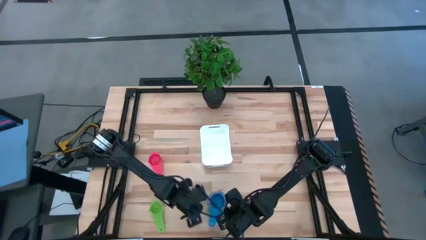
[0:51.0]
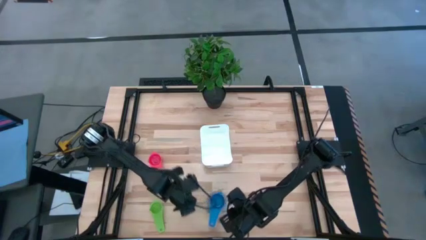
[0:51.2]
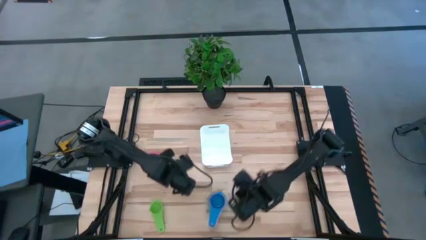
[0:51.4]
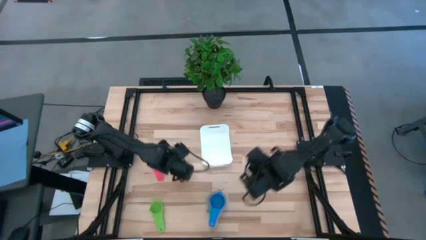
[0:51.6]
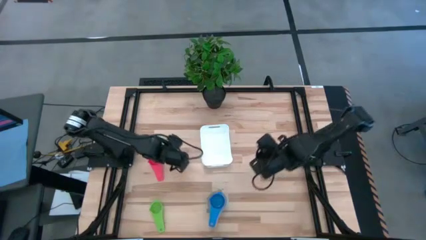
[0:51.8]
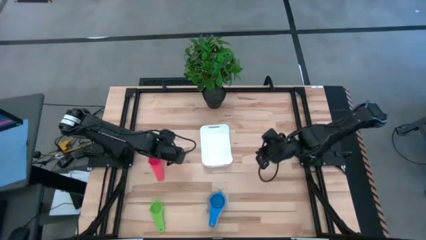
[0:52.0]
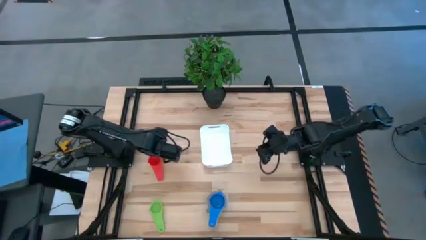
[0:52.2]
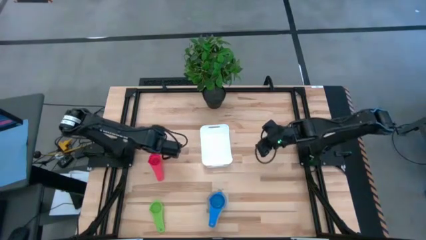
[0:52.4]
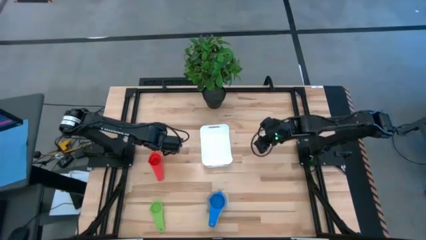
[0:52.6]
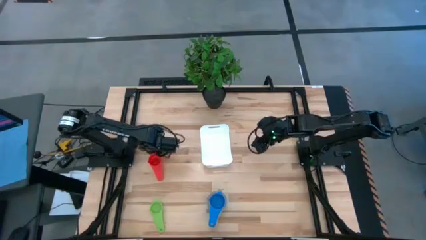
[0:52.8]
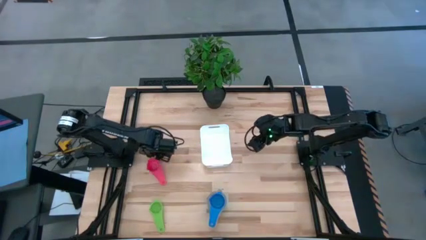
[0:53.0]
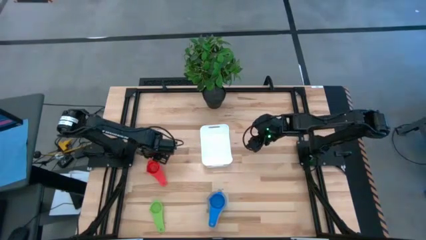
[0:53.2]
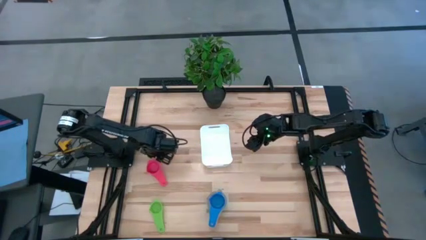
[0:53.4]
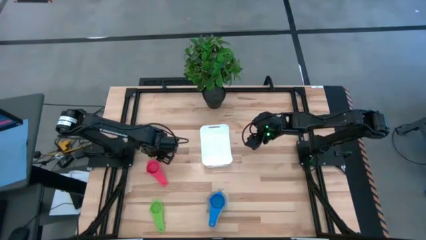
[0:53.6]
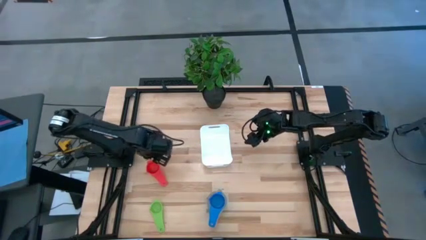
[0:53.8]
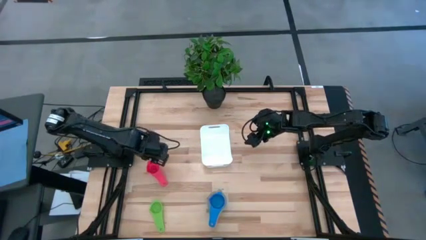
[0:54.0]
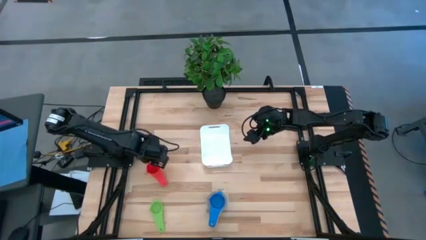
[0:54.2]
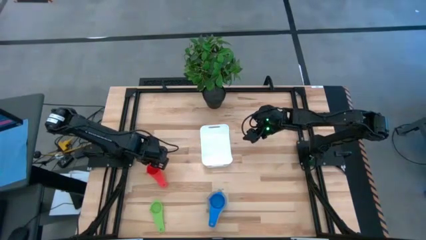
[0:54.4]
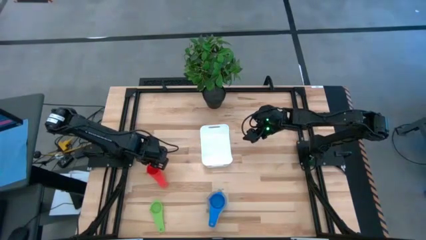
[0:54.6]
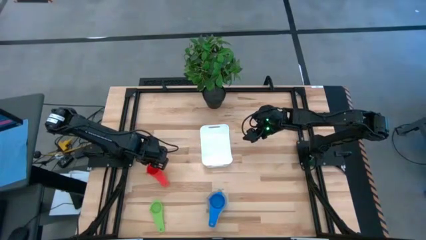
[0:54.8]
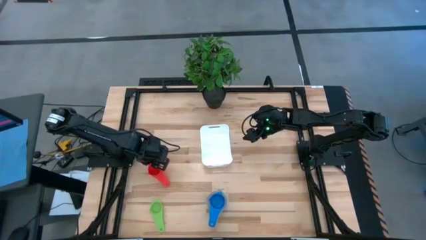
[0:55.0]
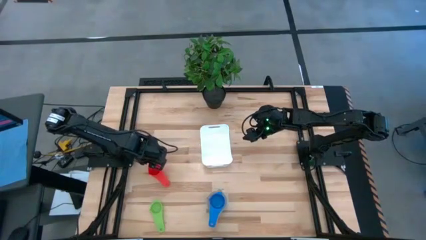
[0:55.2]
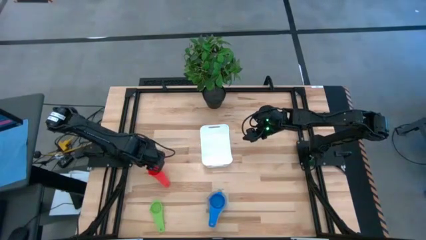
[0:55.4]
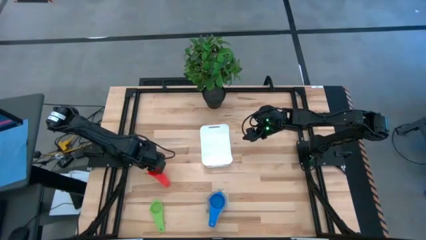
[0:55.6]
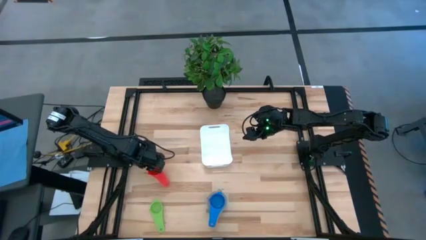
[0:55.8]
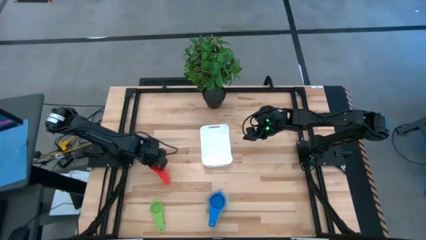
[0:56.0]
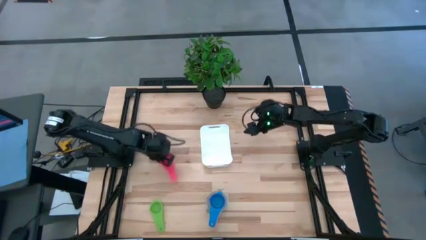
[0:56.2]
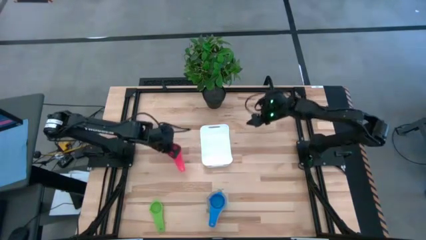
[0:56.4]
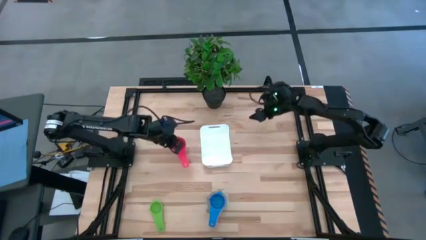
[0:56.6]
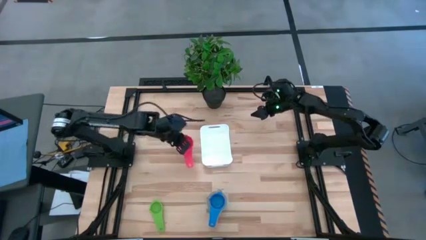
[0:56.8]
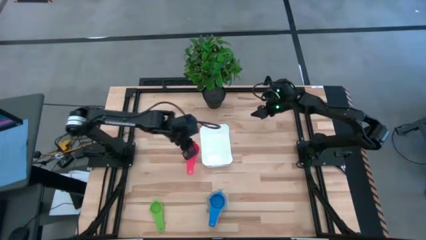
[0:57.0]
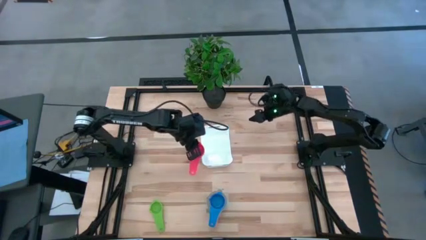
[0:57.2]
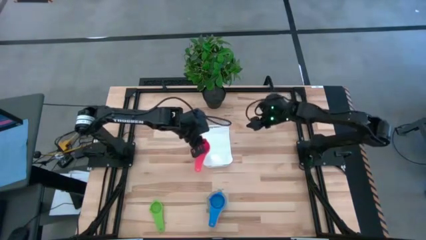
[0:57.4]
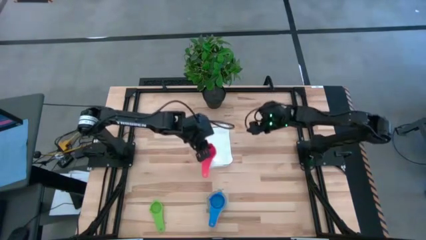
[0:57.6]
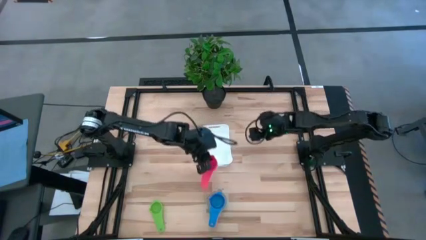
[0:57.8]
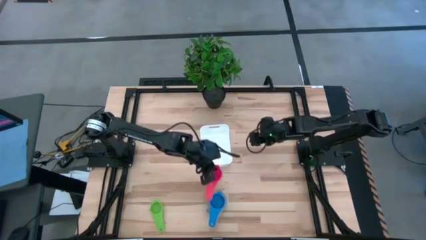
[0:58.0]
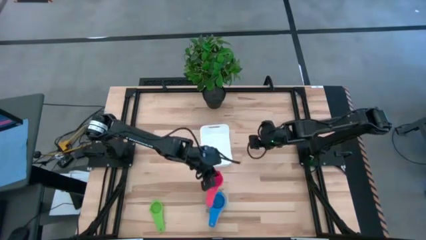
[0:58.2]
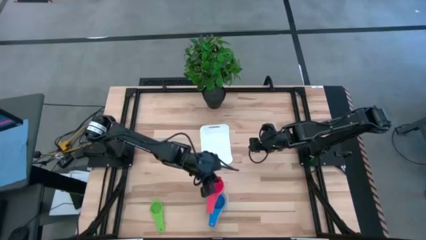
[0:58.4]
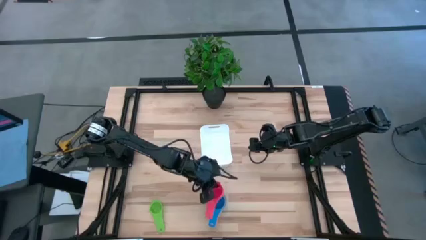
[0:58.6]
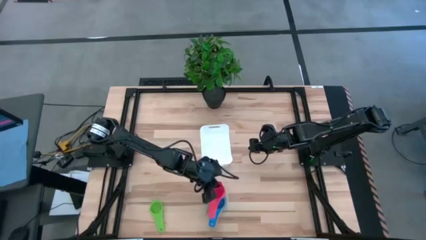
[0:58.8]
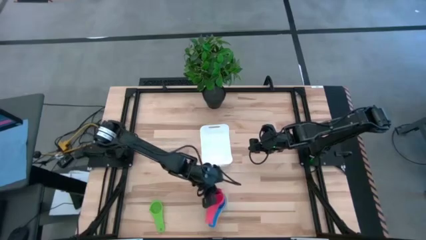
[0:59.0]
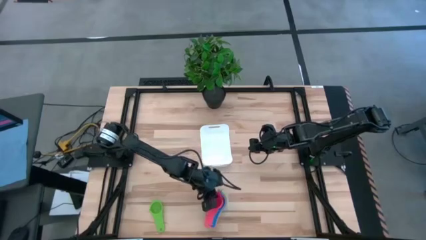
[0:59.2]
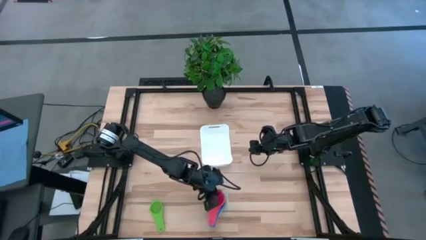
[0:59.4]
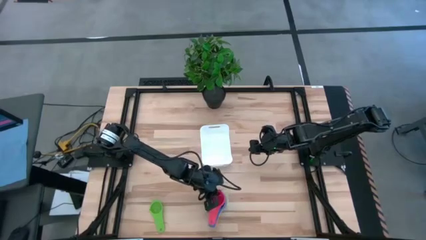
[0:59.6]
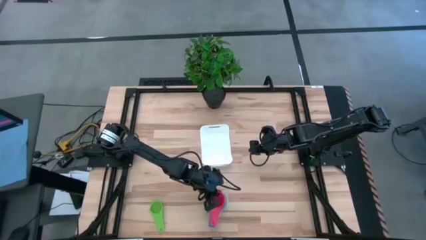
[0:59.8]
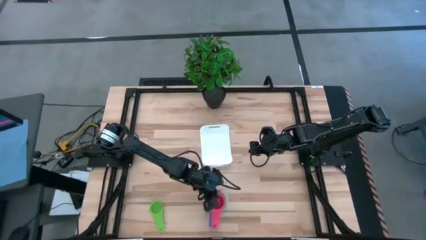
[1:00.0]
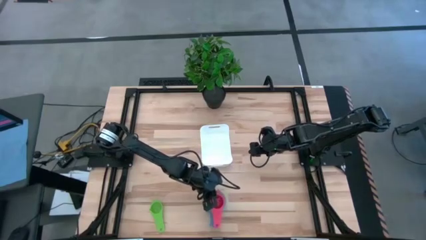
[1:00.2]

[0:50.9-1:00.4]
Task: Nest measuring cups in basket
Stack the pink measuring cup on top of the blue measuring cup

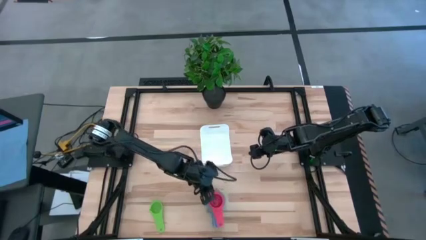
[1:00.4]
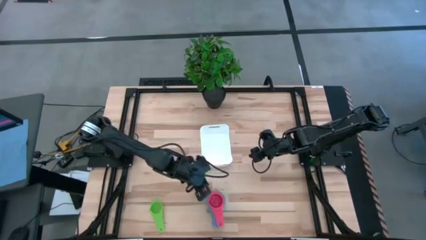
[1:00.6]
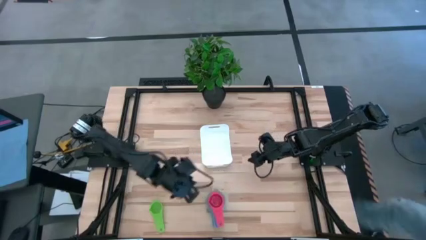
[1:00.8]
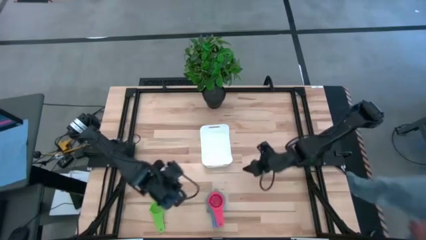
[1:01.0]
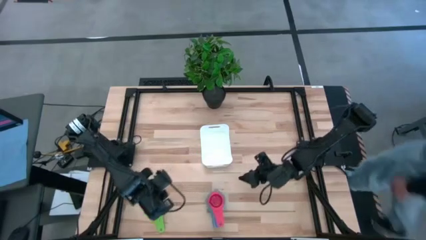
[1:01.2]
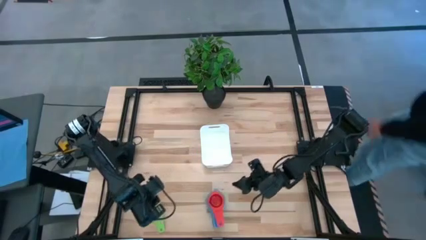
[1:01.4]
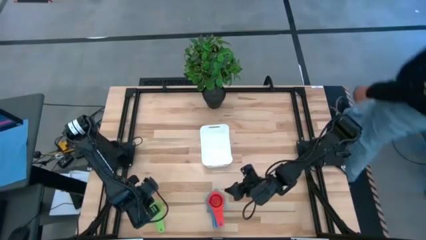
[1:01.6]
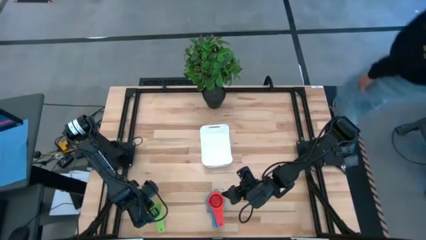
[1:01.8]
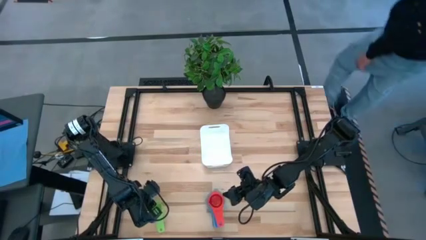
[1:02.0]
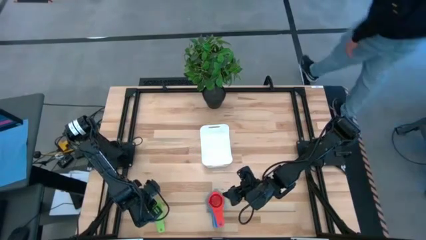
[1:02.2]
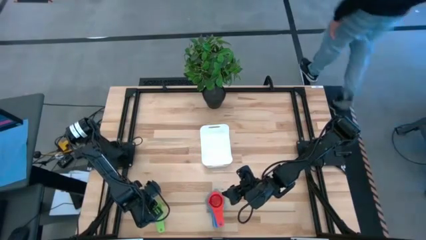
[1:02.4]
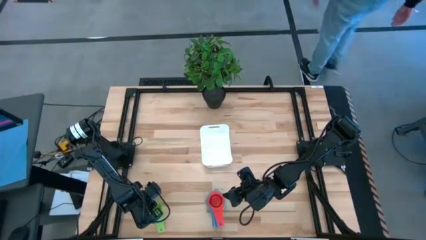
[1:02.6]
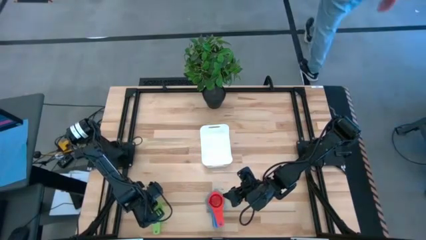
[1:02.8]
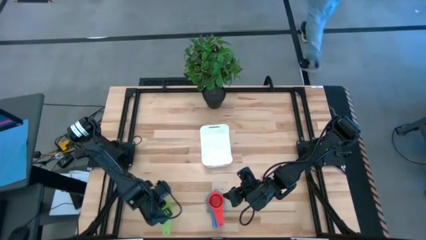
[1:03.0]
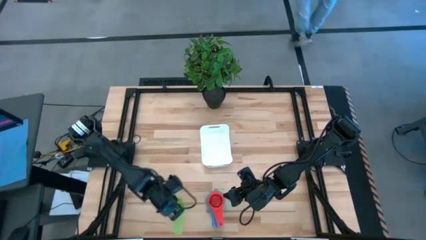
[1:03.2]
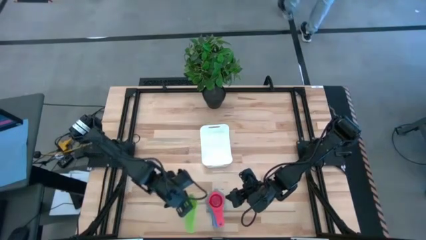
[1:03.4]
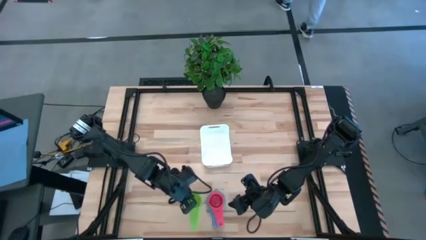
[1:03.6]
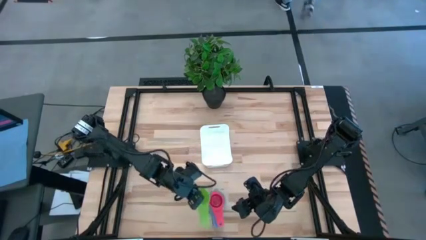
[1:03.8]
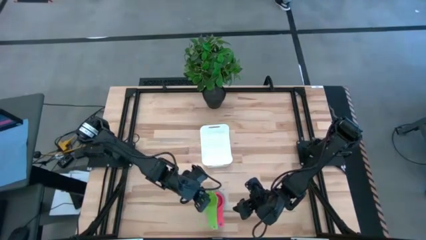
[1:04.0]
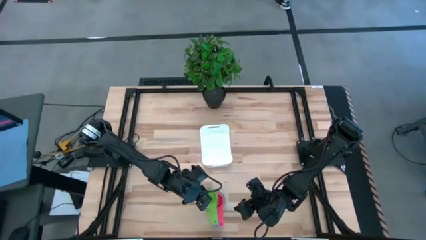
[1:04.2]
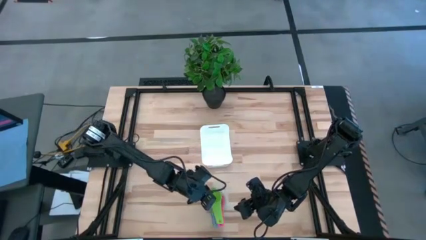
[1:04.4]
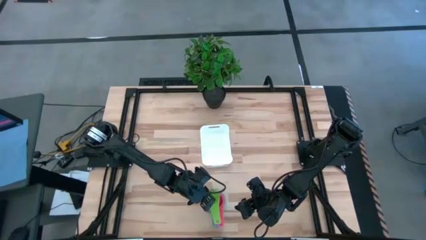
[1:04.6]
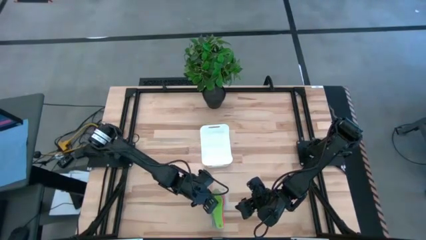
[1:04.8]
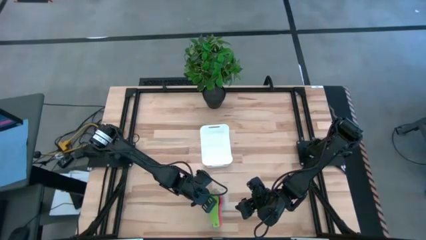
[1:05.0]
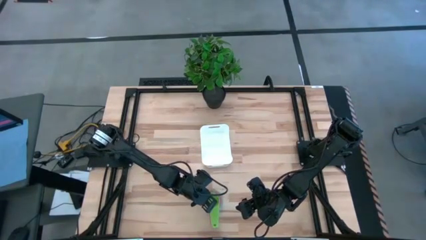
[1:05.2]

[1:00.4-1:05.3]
Stack the green measuring cup on top of the pink measuring cup

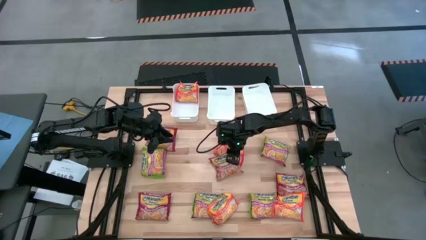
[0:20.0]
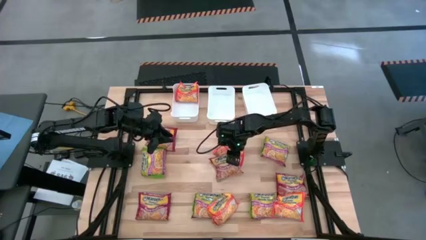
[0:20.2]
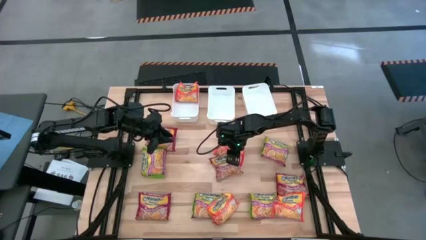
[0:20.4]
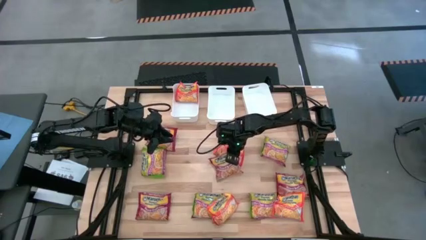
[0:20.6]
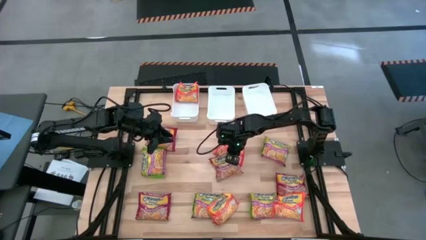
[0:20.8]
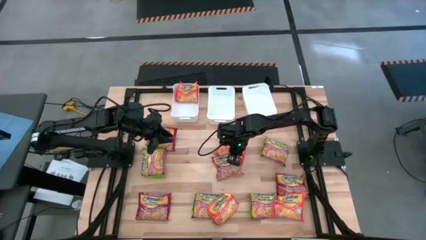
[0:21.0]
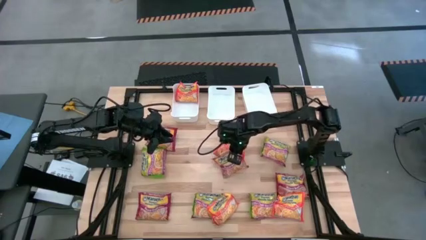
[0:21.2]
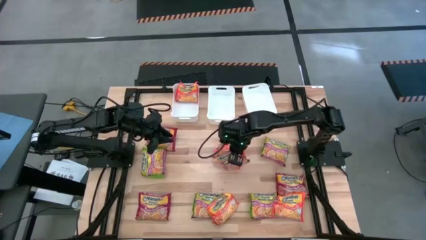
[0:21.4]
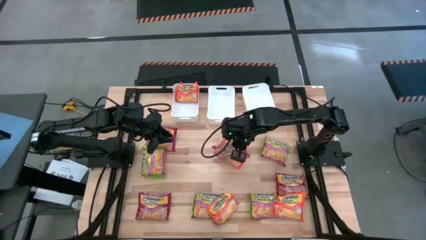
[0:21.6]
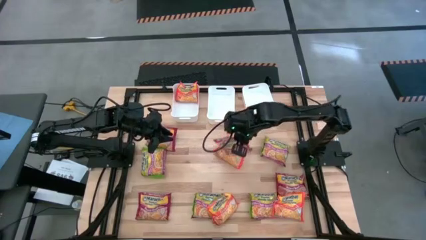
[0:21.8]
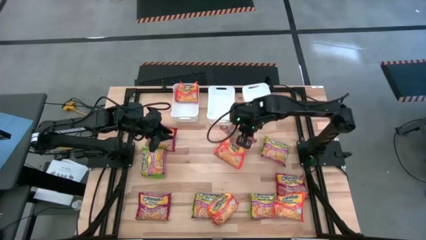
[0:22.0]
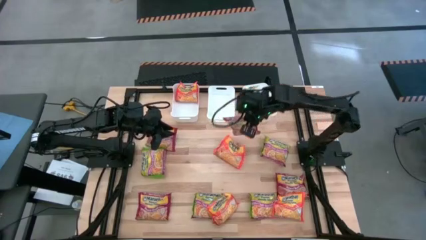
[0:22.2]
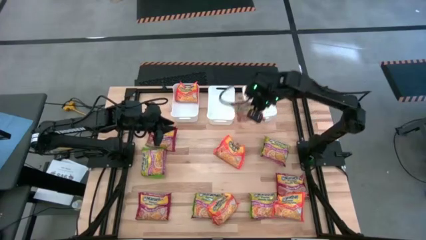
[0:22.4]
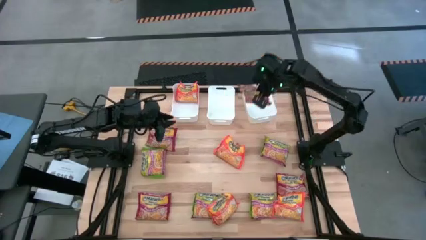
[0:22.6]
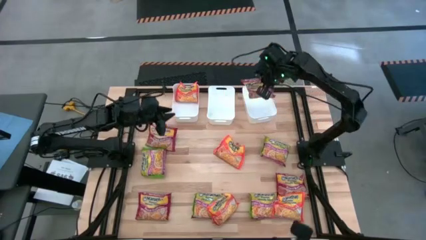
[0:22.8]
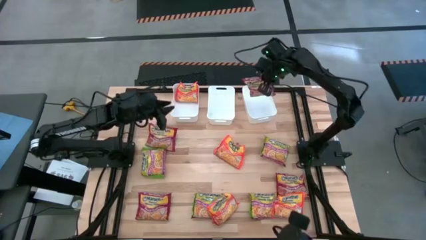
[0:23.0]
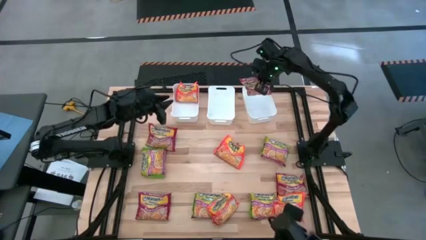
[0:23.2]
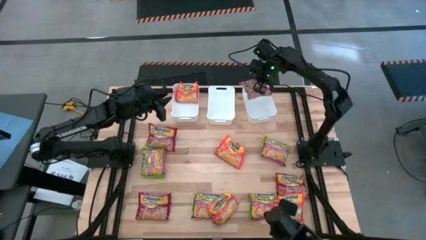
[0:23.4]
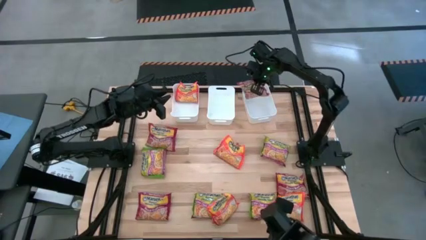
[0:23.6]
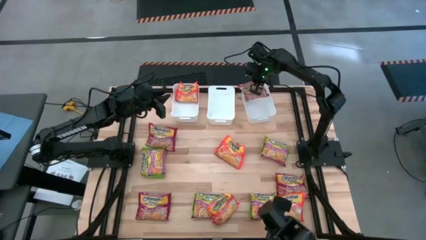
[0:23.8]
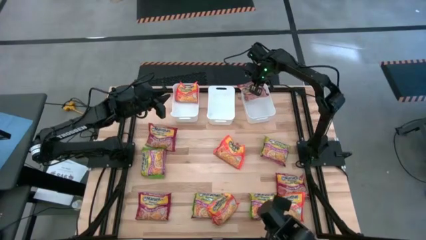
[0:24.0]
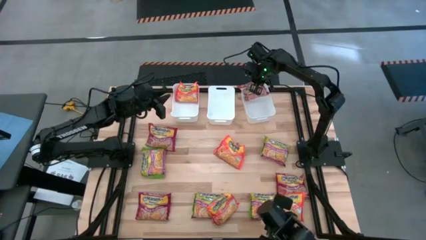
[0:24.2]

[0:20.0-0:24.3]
Task: Sort Maruchan noodles
Put the red noodle pack into the right white bin
